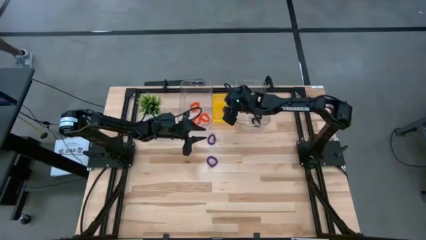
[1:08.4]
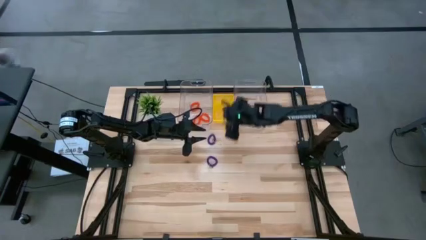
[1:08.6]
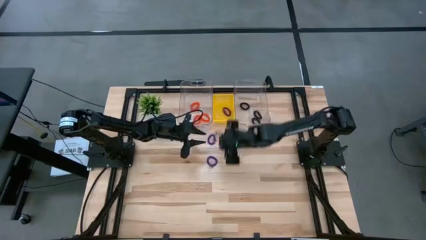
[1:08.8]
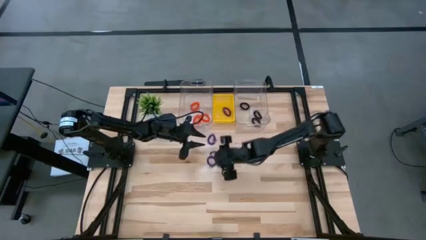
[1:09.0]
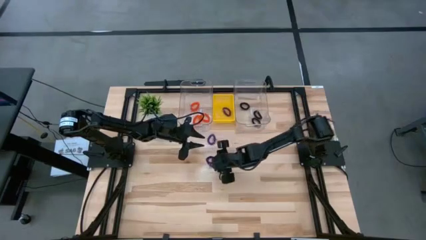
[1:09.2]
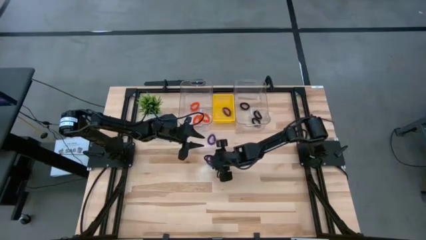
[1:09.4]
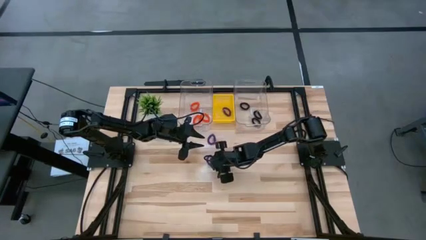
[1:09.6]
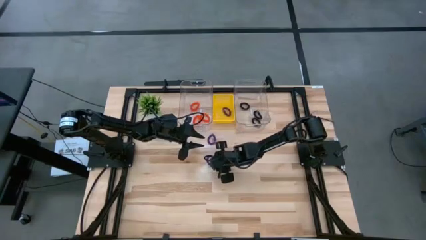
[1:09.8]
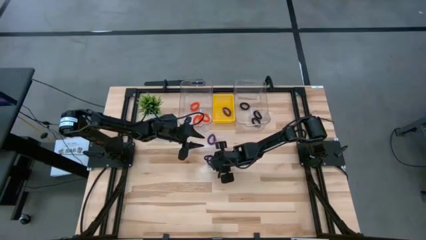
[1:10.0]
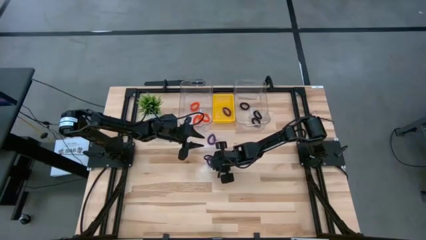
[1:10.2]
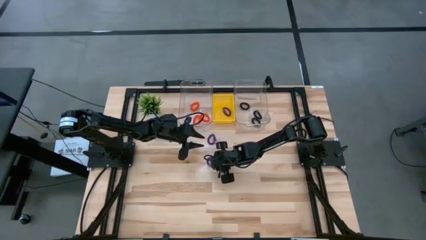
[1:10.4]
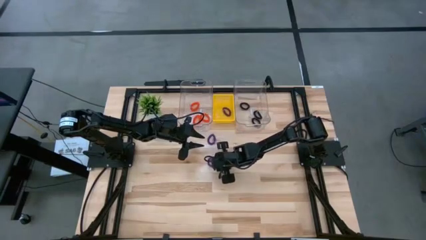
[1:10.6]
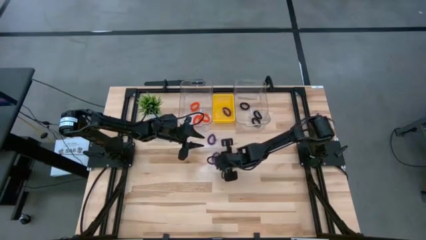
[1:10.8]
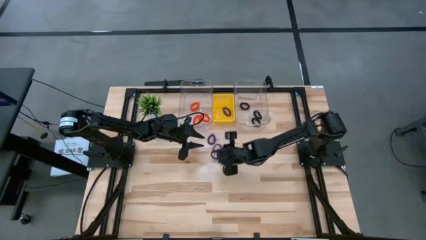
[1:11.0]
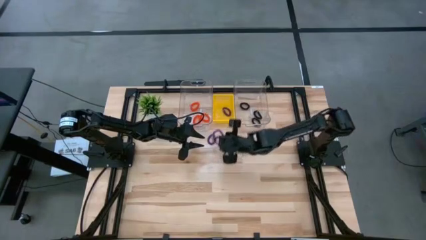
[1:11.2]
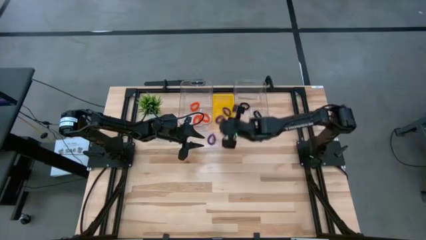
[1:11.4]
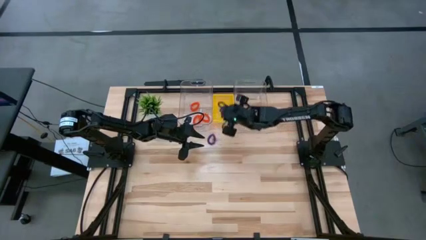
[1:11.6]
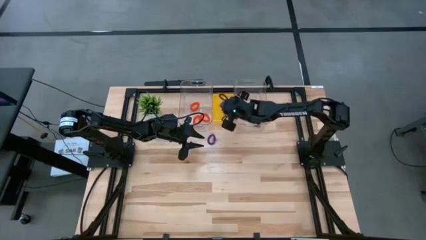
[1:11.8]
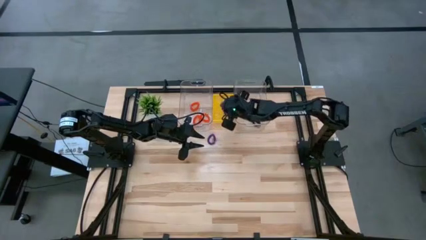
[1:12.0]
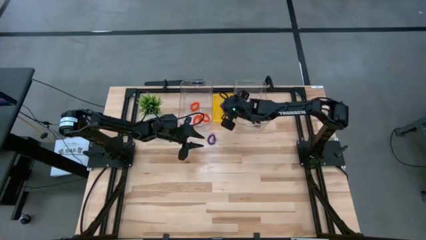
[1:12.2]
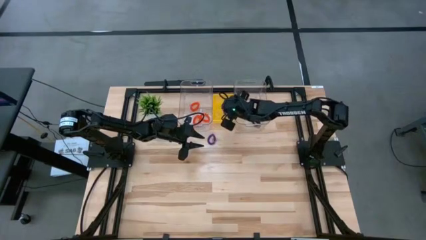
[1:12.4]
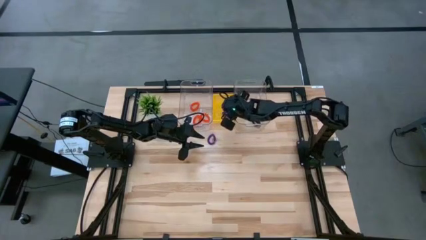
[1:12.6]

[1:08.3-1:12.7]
Task: Sort spring keychains
Put the bottom purple spring keychain into the yellow bin

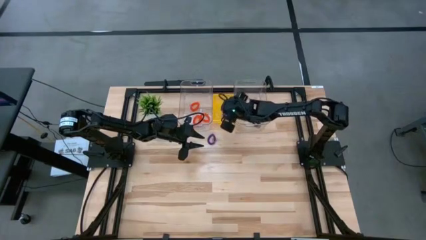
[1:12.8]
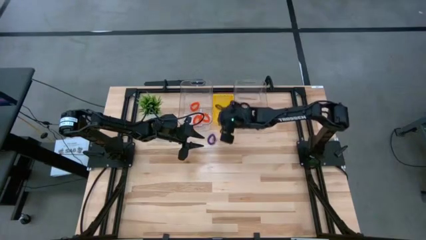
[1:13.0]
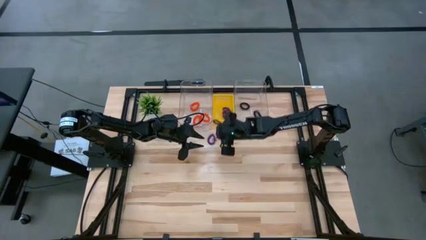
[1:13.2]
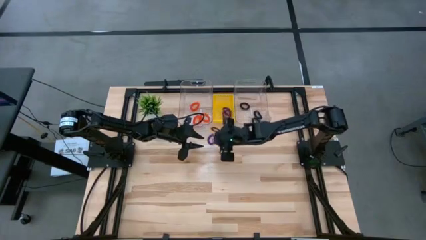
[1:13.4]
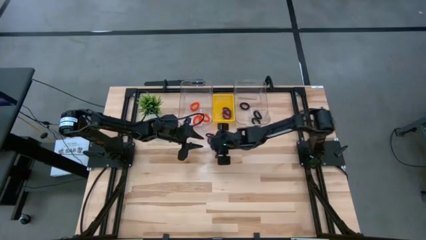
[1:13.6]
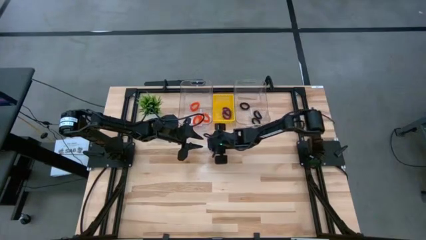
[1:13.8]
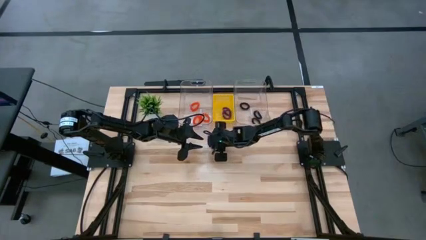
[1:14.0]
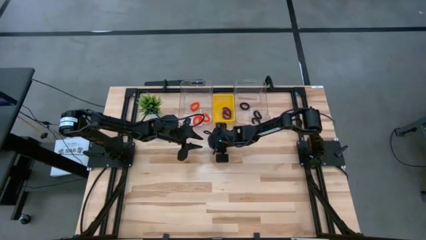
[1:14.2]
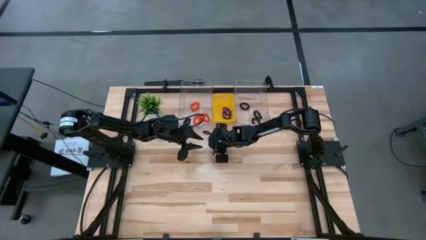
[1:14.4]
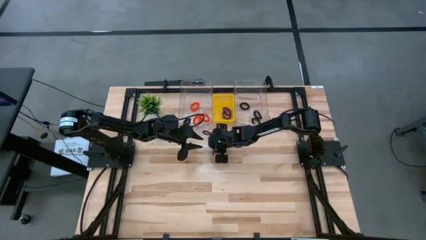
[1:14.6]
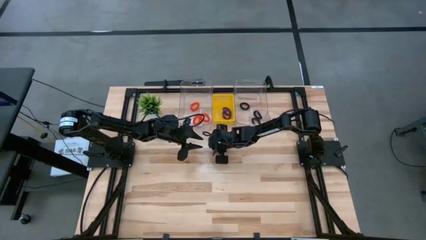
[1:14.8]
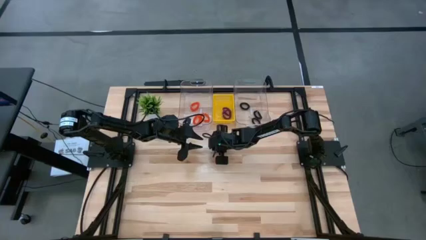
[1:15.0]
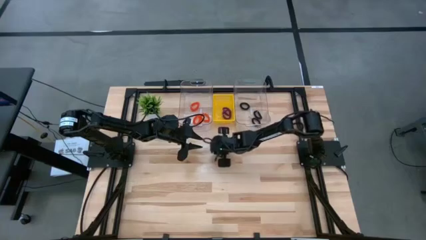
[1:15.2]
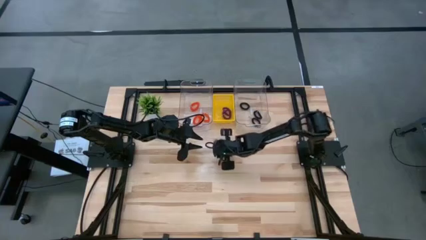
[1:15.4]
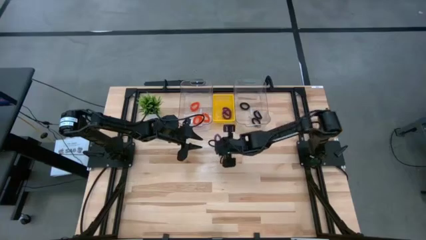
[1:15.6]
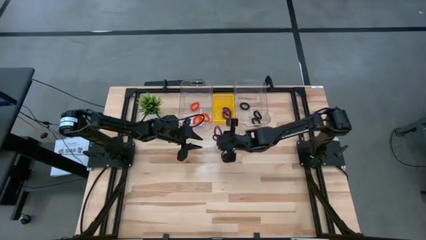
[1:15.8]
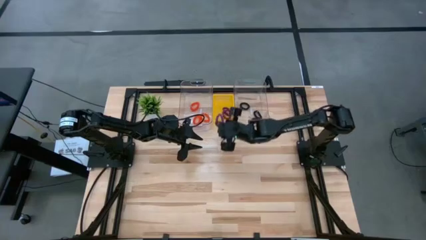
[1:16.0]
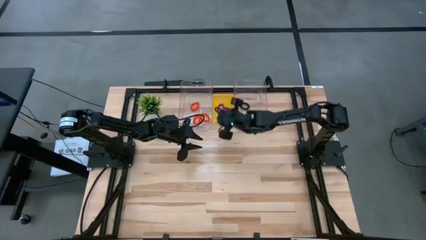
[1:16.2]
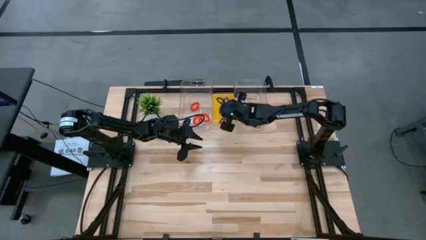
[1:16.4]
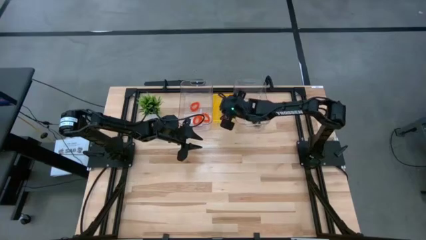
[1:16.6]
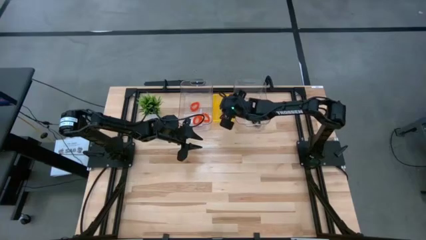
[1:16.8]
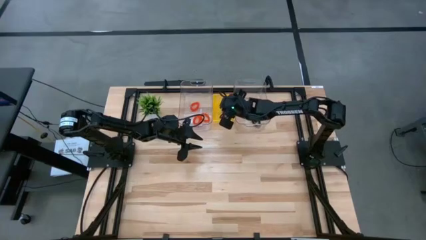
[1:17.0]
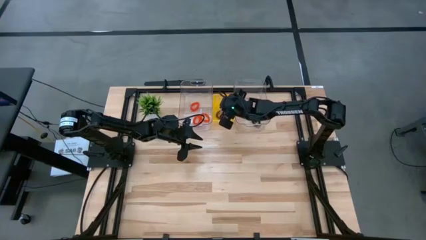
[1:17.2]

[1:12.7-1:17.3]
Put the purple spring keychain into the yellow bin

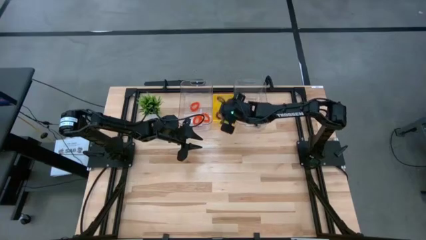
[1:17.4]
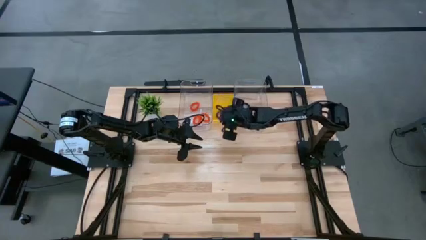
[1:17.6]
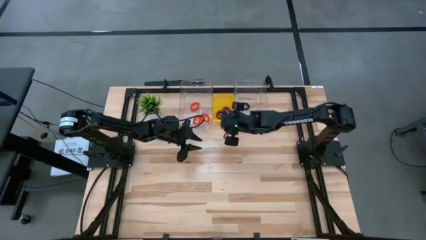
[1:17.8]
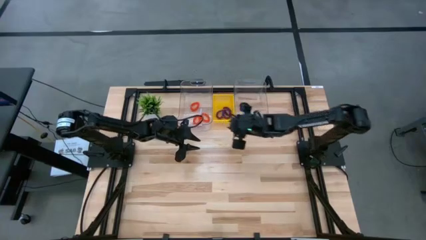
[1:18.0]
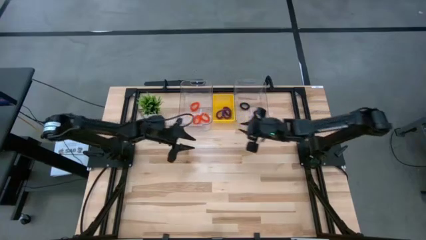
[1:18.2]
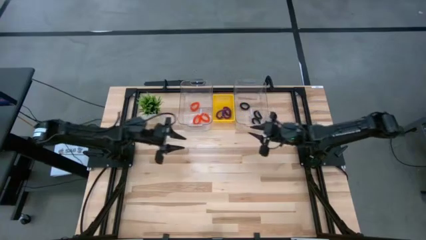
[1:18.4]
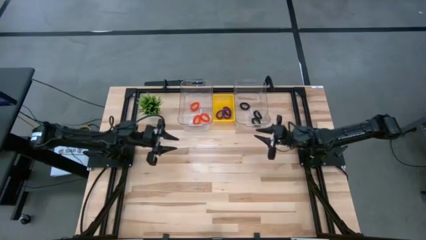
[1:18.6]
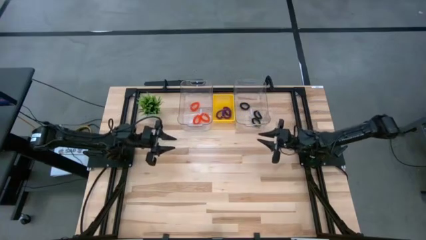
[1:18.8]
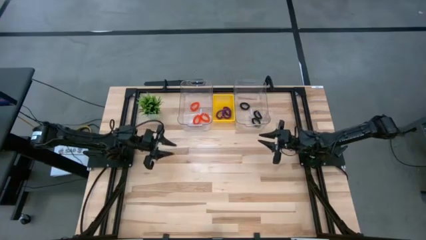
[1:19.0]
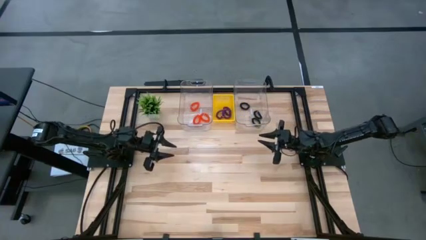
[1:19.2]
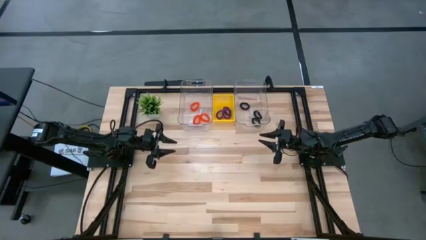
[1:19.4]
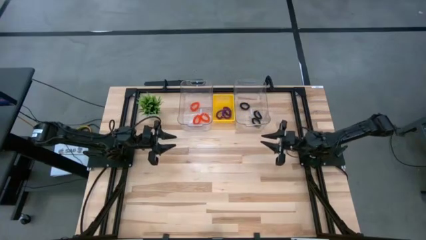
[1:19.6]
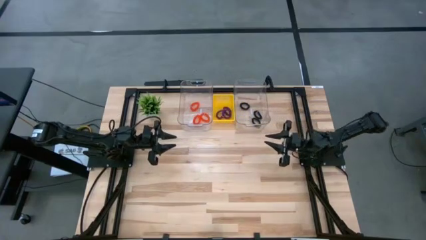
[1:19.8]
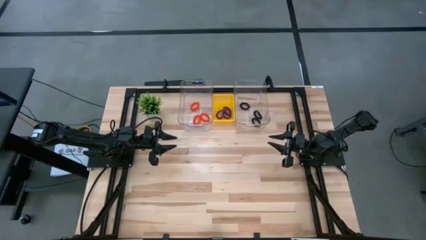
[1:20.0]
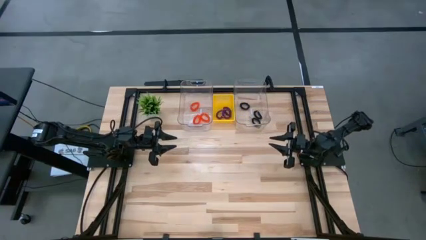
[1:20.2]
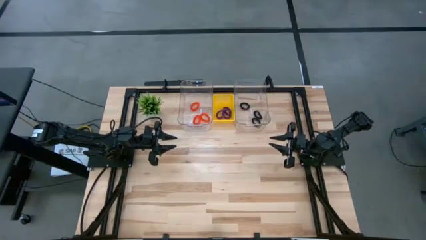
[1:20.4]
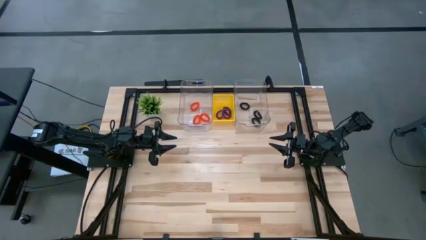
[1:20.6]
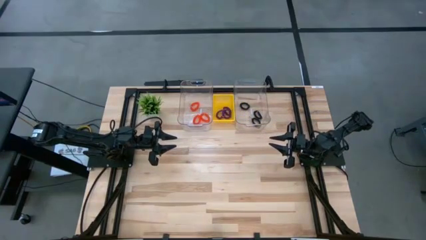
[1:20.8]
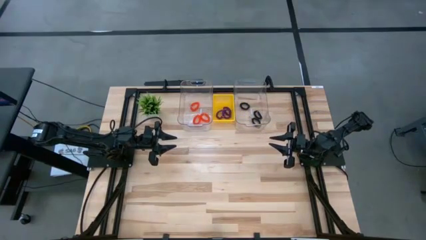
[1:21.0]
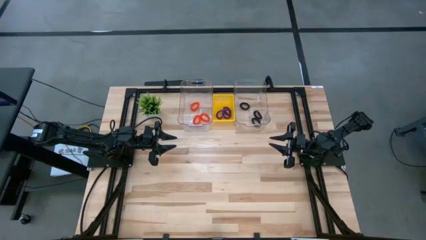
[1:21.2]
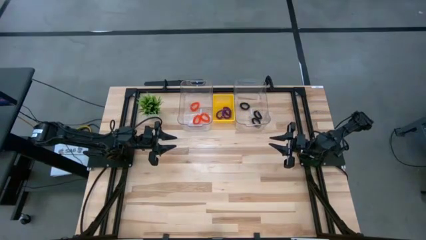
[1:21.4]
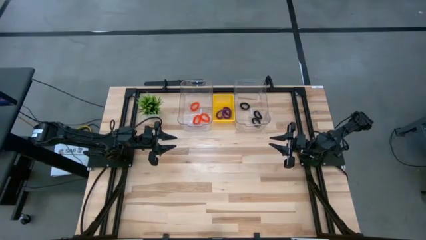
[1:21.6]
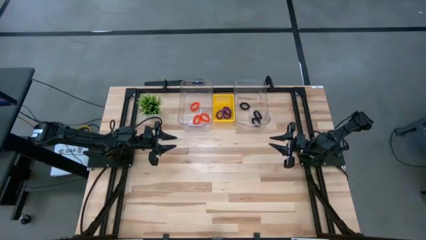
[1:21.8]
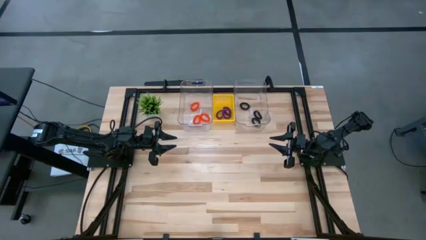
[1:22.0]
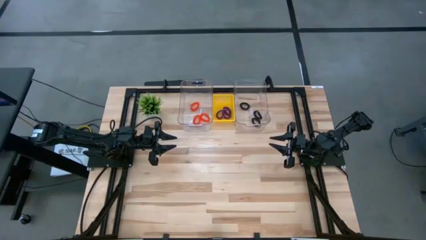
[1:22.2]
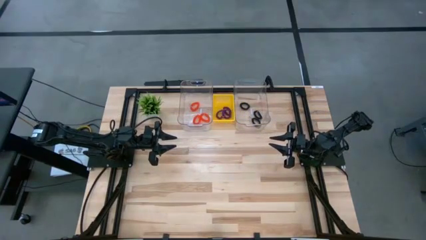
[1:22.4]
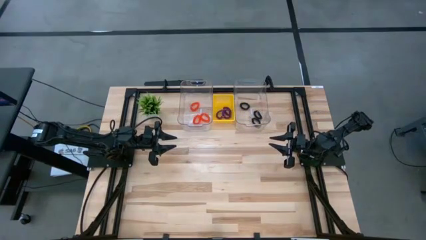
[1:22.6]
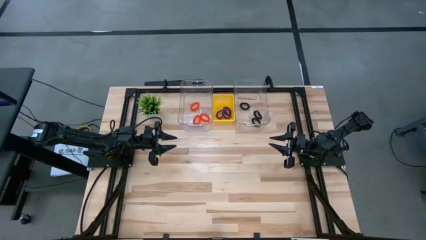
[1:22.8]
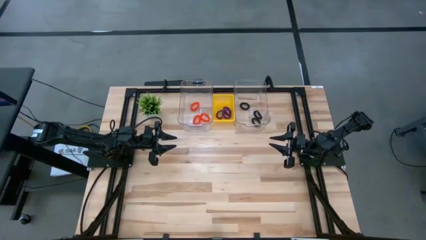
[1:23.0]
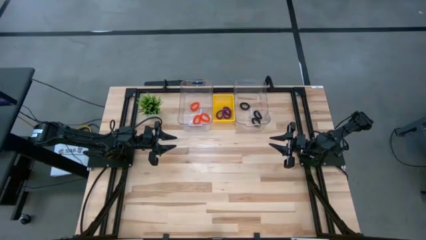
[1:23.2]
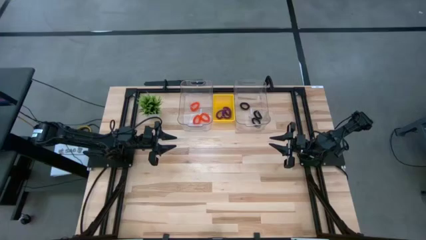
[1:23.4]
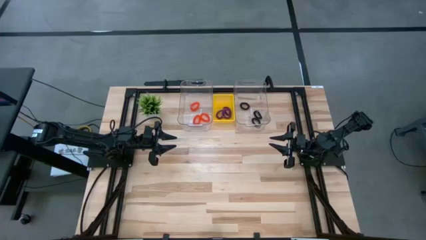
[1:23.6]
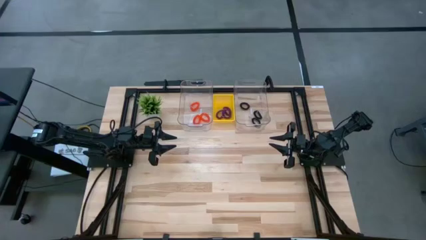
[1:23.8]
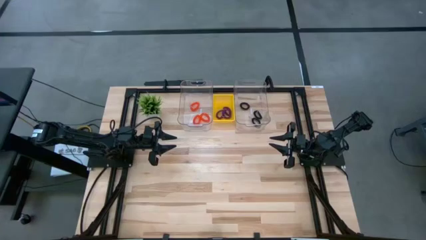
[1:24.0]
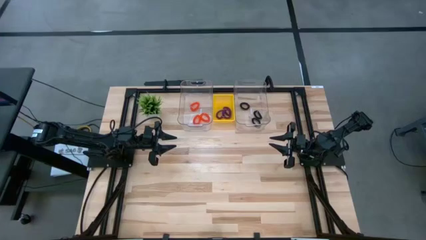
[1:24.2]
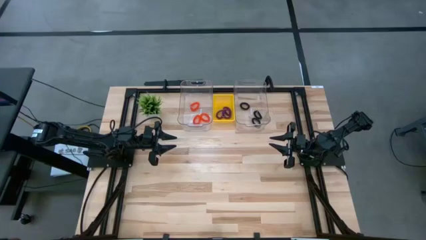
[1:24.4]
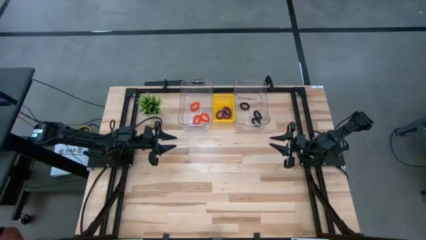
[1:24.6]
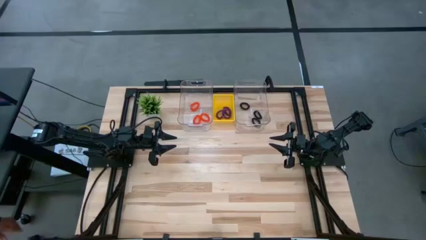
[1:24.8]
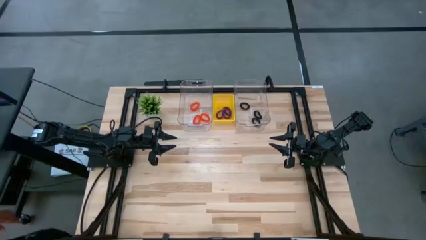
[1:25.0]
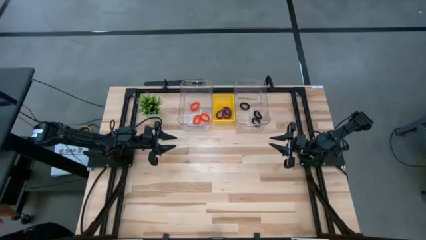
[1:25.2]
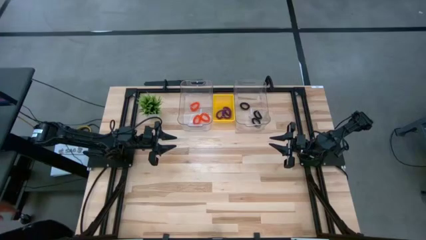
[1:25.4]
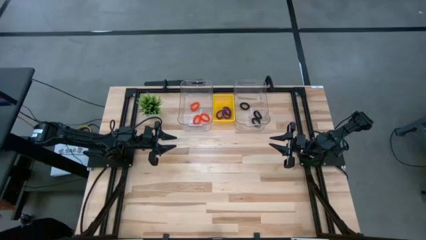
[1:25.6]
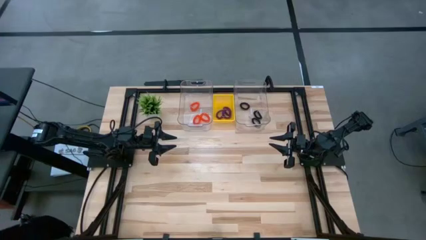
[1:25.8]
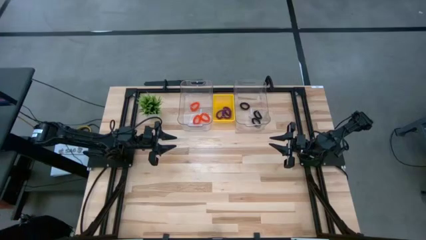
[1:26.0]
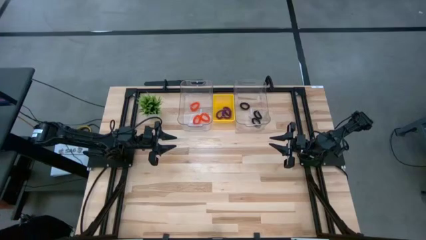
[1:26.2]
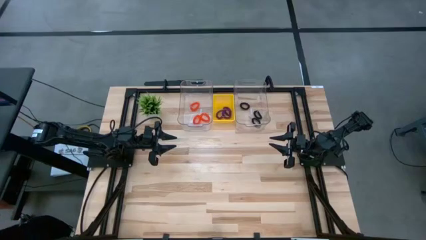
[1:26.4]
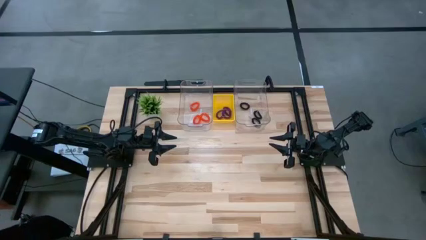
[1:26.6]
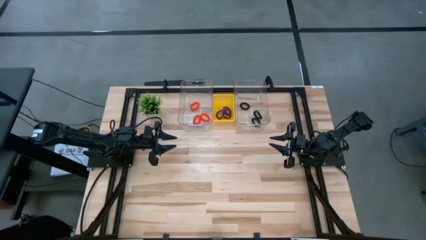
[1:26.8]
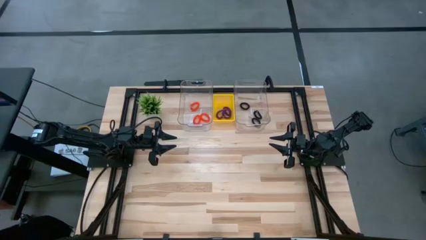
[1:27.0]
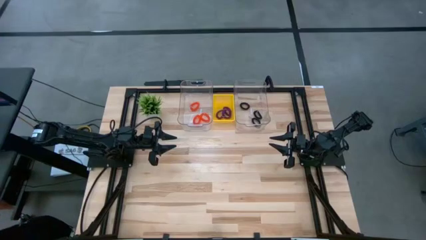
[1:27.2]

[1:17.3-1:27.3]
Return to Home Position
